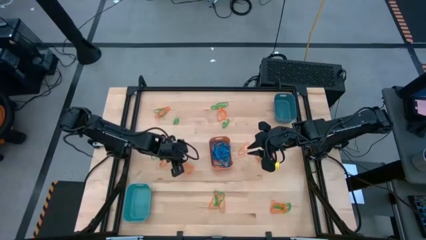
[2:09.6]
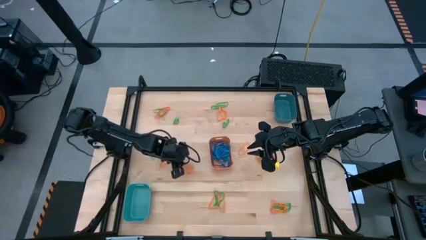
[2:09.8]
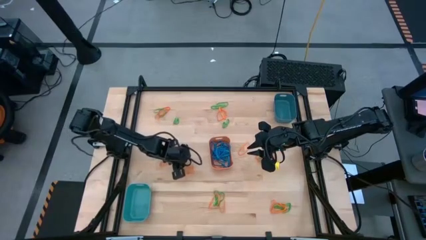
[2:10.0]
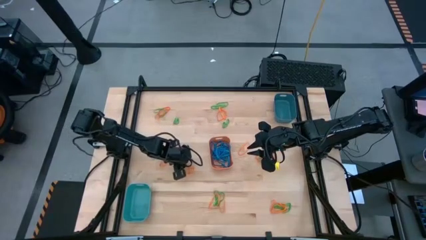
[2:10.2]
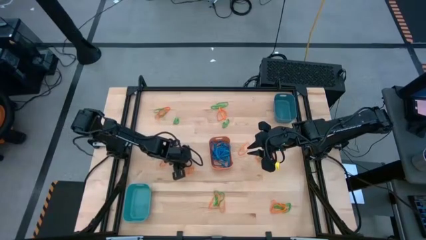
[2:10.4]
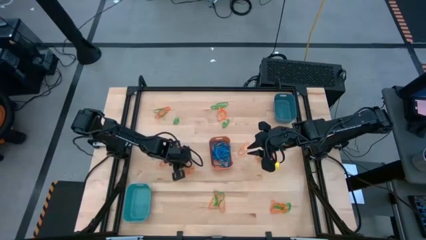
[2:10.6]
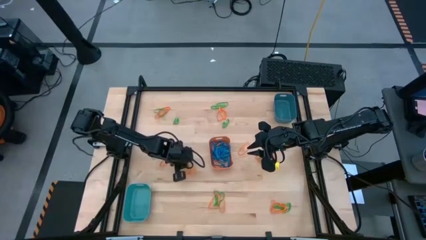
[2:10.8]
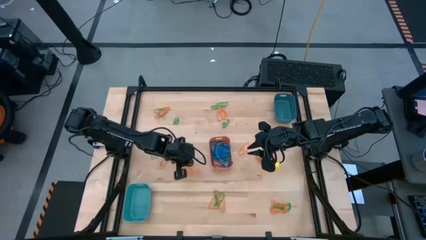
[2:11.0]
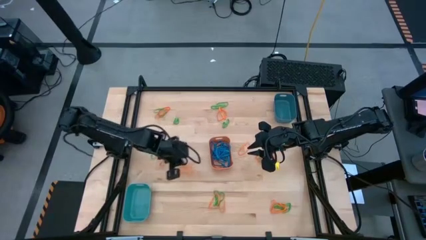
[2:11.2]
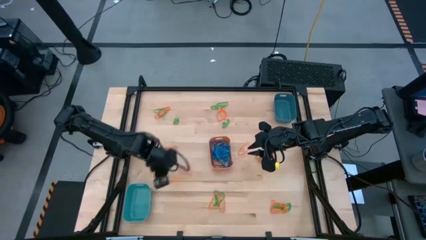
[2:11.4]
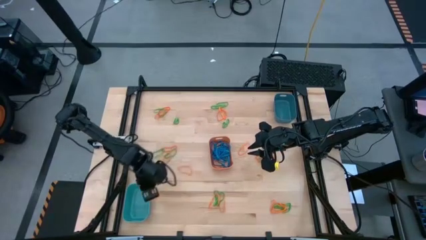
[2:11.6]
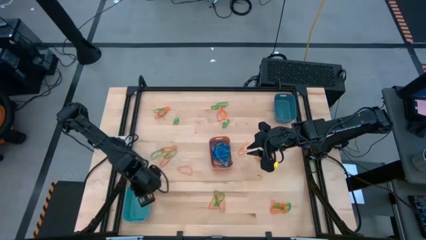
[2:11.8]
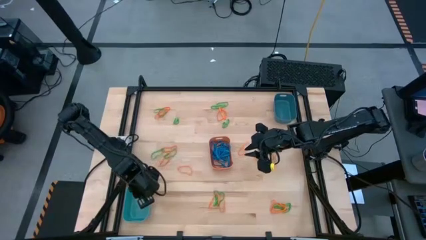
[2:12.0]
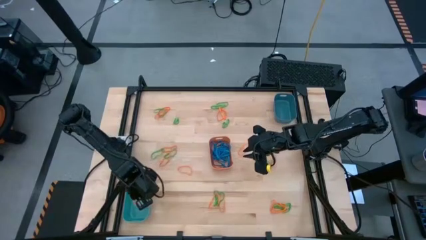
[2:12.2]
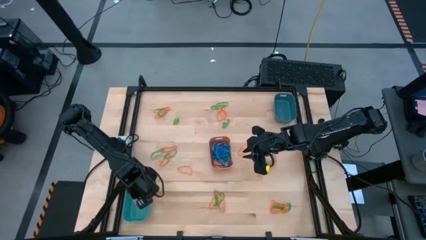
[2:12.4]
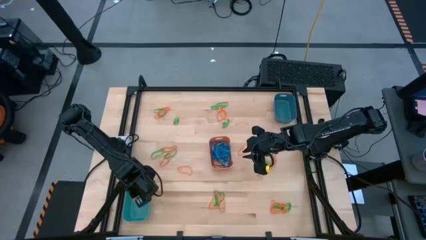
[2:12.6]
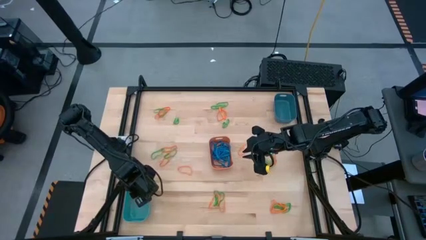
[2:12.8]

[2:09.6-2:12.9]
Task: Sort rubber bands into baskets
Put the orange rubber band into the green bin

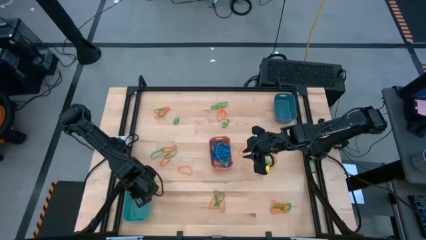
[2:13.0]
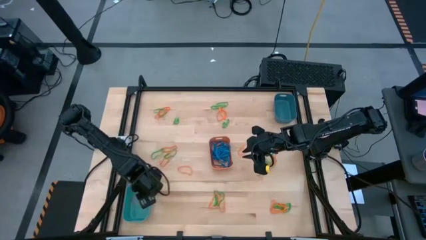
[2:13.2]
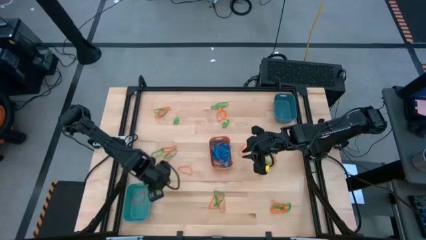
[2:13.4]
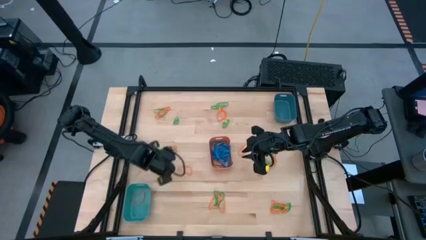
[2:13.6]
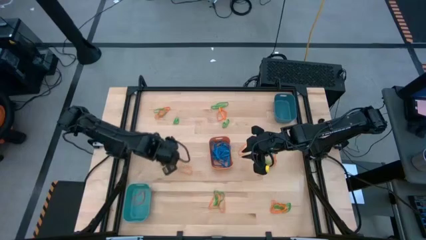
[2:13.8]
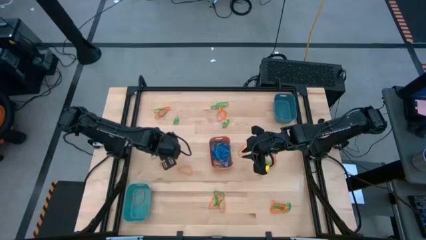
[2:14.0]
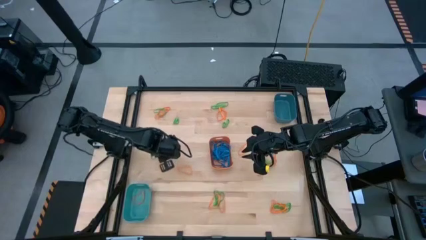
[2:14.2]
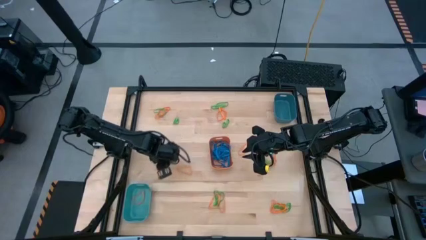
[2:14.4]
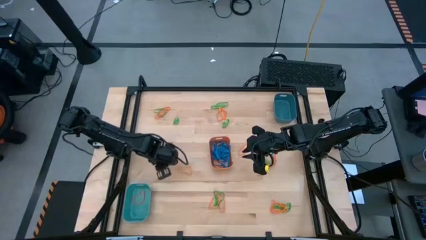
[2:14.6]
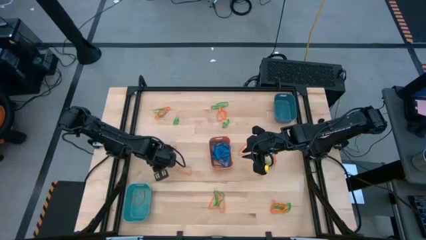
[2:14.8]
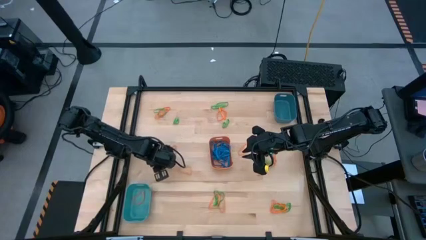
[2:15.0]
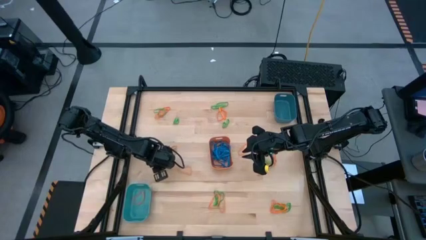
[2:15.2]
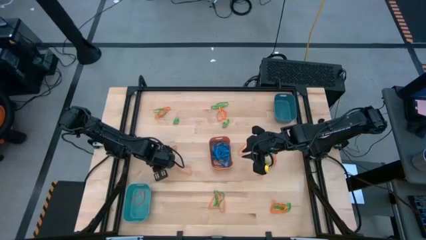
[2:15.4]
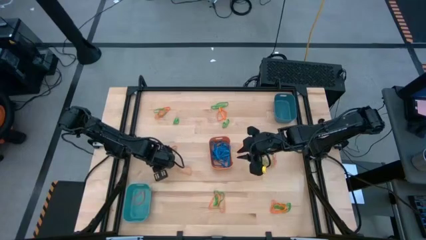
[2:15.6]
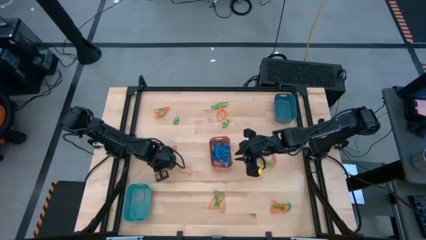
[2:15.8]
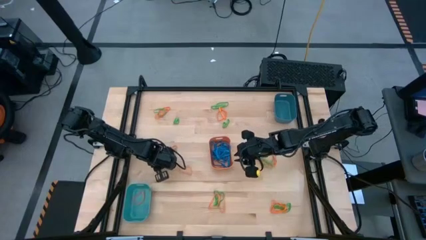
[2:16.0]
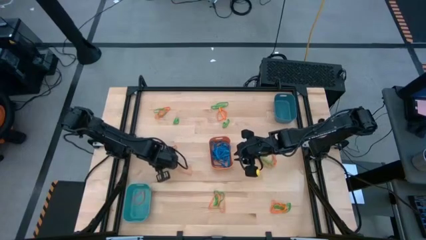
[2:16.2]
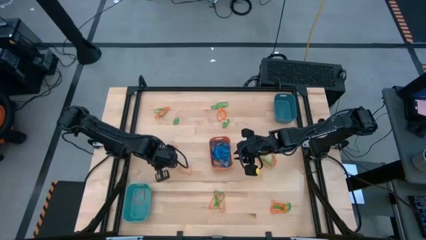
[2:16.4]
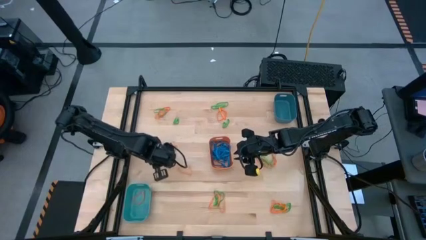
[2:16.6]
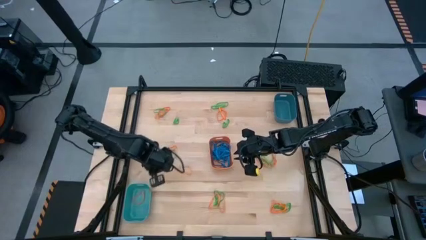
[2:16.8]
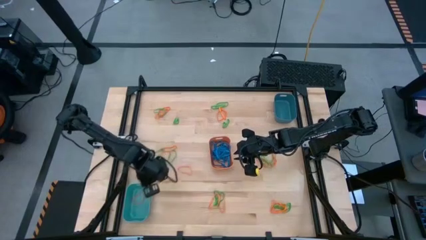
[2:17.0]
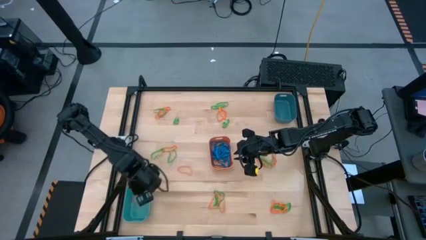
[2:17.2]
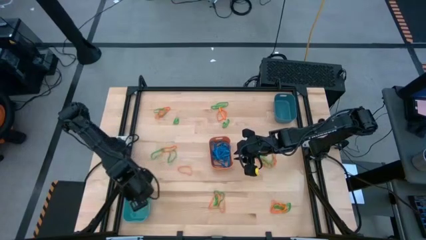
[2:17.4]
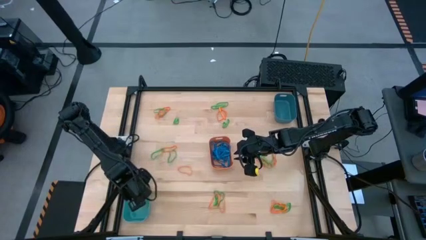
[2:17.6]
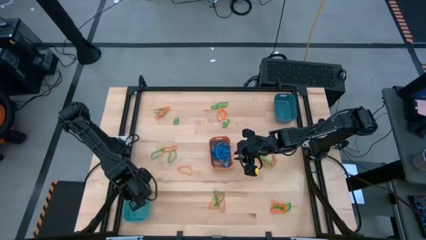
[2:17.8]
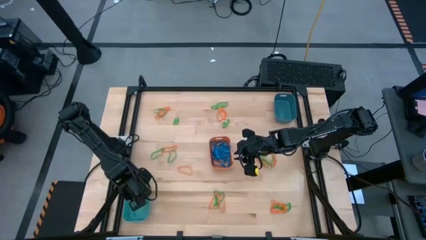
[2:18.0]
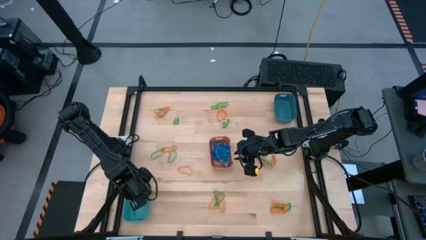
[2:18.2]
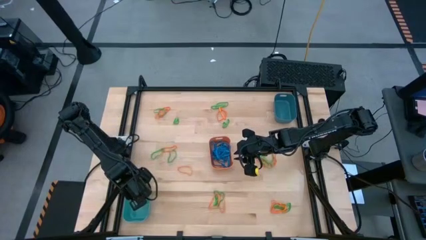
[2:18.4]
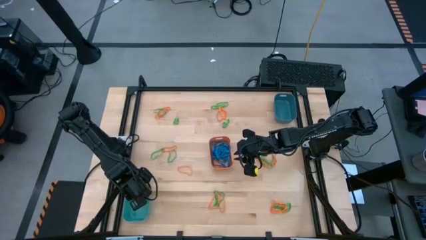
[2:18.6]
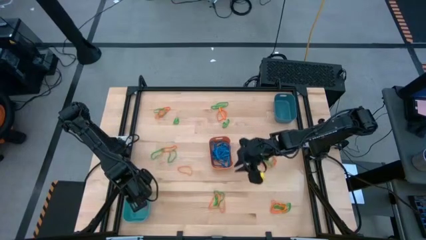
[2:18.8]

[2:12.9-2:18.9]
Put the orange rubber band into the green bin

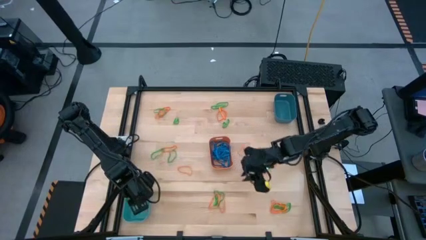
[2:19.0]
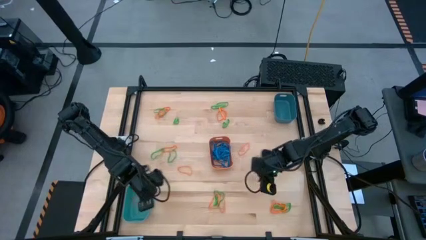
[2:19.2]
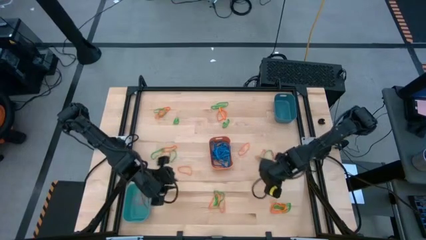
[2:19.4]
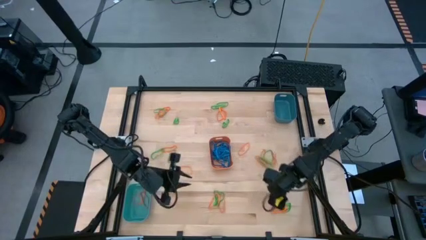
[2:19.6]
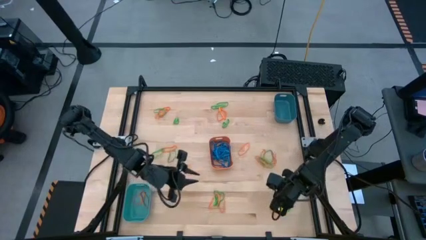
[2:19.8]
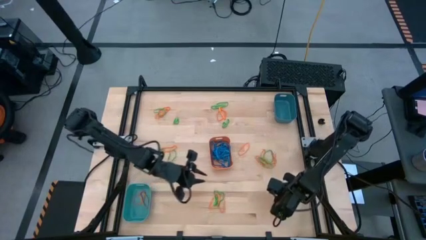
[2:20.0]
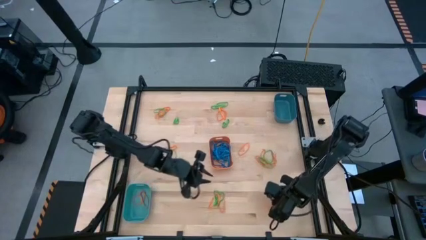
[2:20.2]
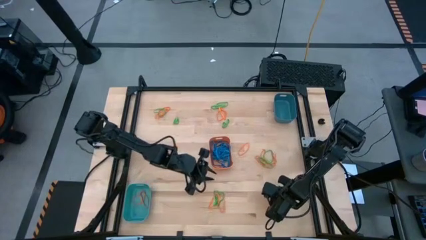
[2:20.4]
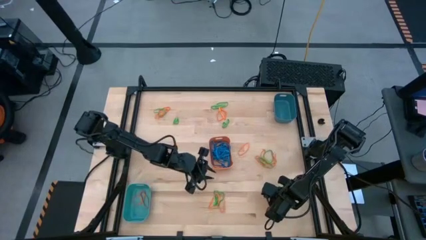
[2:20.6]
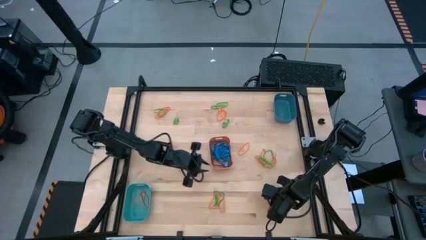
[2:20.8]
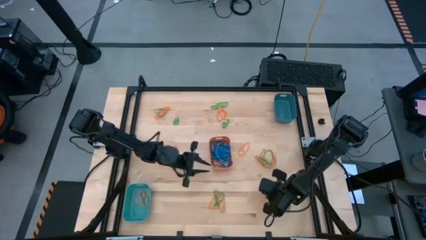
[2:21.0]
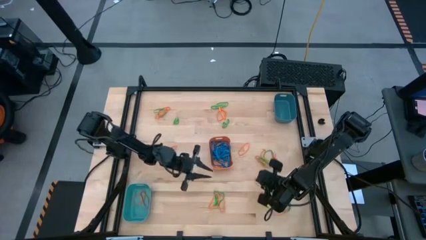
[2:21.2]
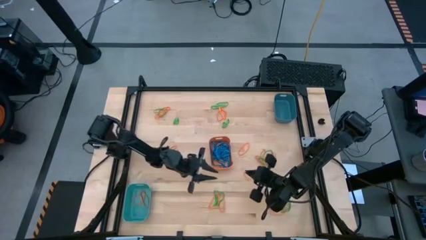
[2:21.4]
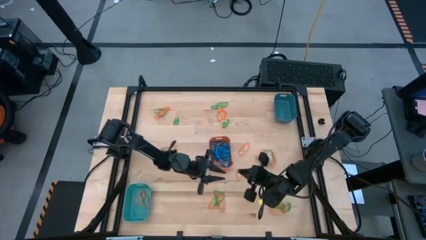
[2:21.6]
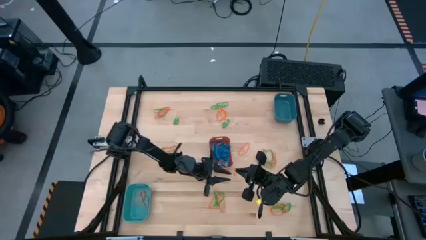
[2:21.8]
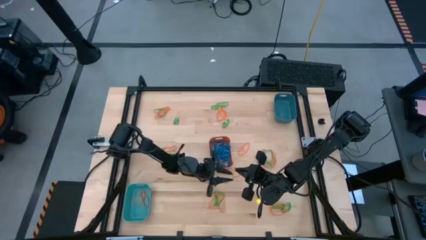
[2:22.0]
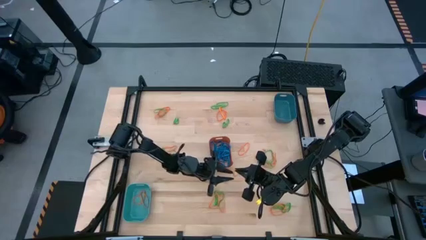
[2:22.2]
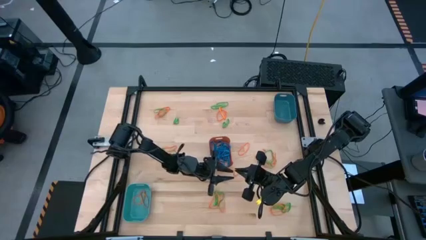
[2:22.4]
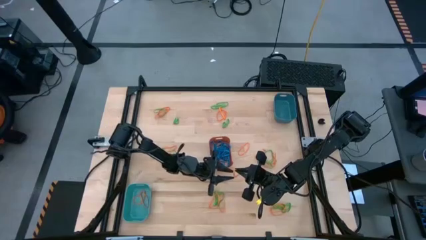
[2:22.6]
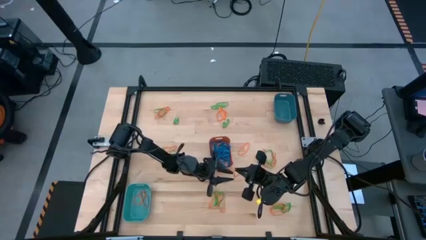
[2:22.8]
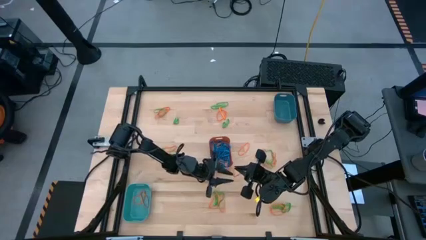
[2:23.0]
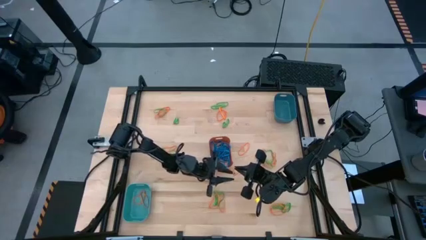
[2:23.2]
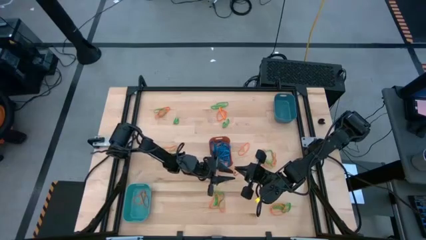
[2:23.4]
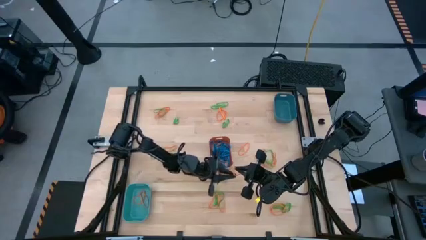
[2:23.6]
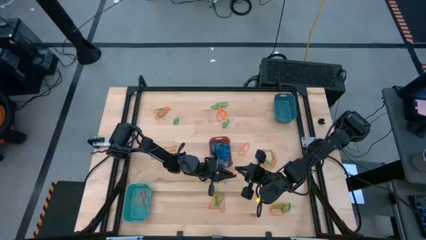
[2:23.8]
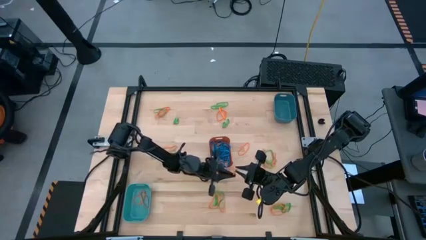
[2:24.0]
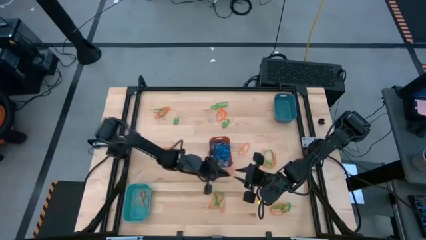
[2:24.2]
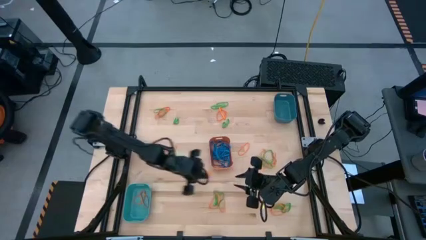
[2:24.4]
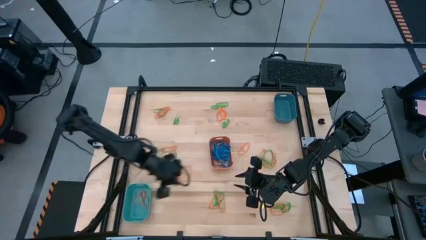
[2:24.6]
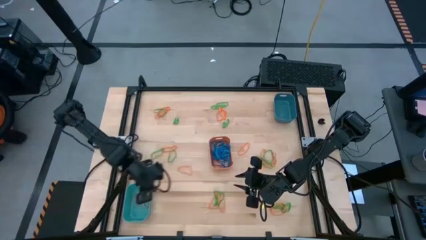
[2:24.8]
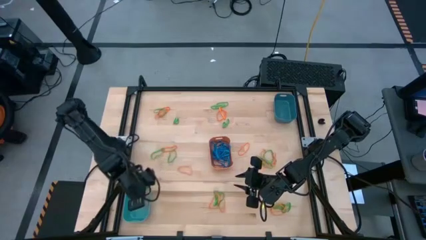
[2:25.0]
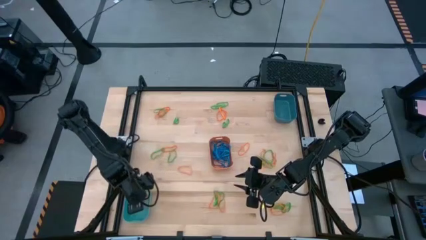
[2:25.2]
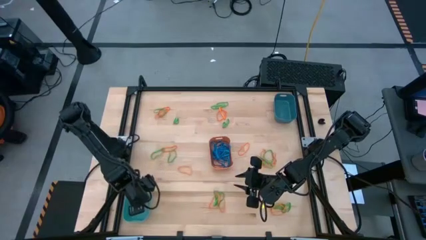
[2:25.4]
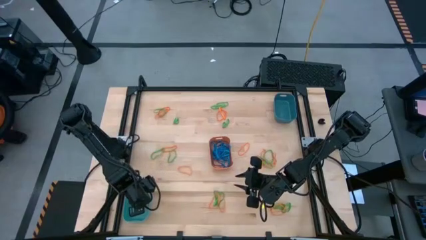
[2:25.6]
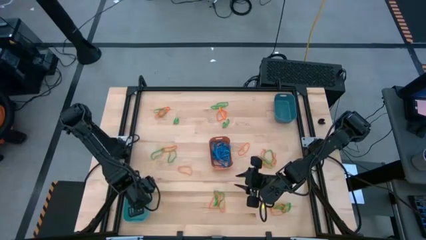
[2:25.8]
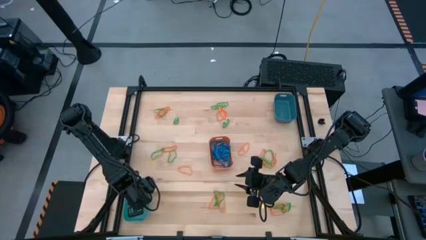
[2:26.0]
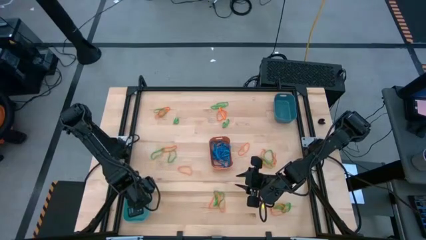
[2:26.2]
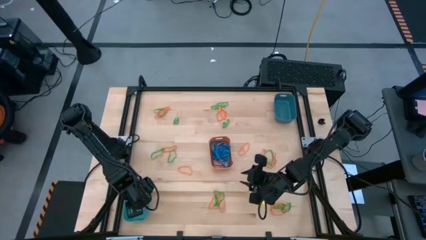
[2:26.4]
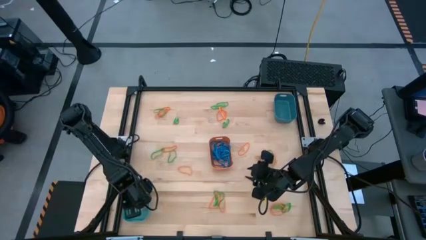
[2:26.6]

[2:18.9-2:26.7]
Put the orange rubber band into the green bin
